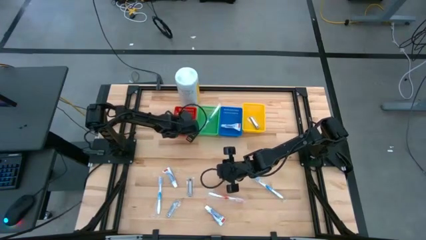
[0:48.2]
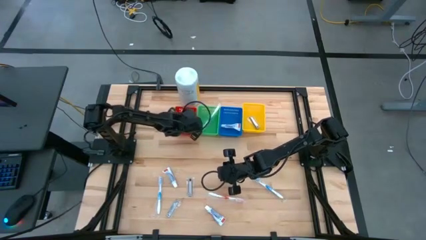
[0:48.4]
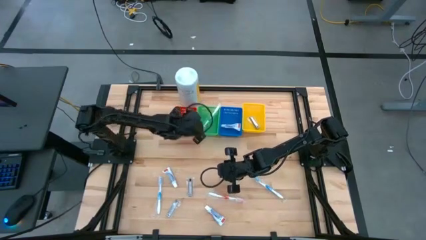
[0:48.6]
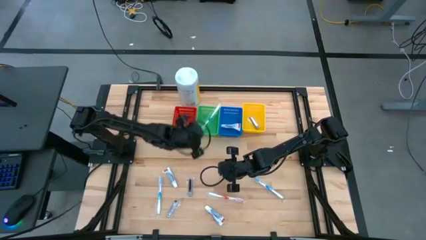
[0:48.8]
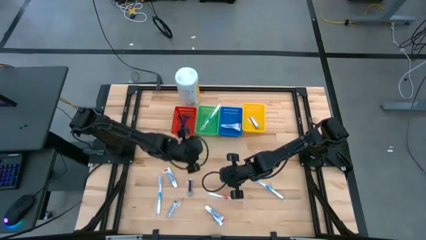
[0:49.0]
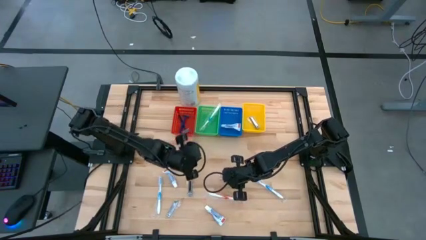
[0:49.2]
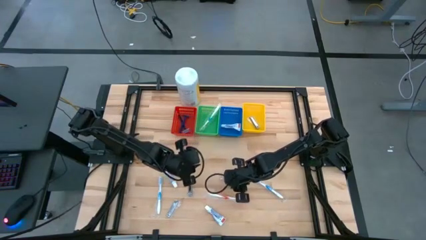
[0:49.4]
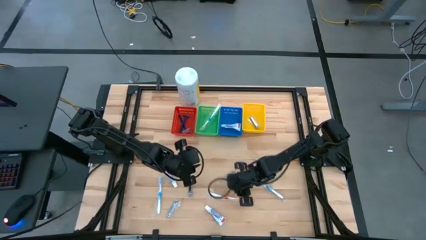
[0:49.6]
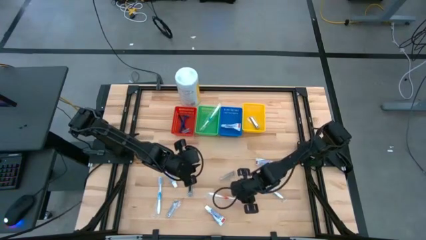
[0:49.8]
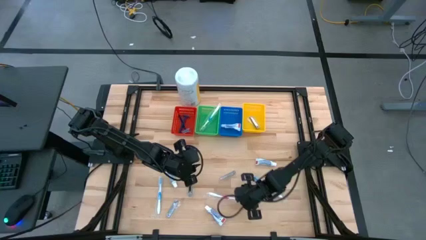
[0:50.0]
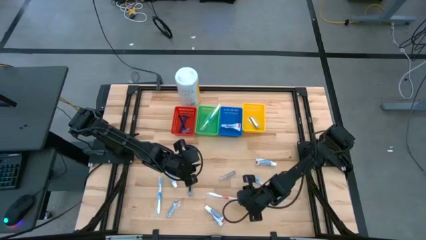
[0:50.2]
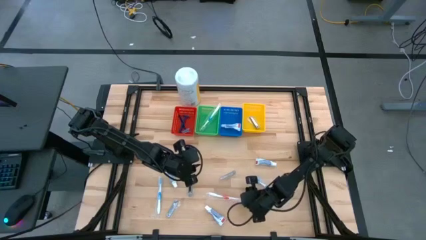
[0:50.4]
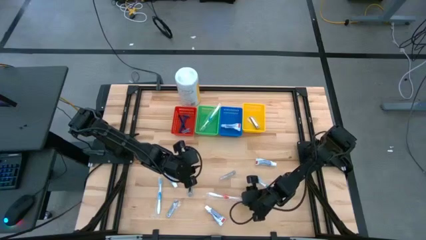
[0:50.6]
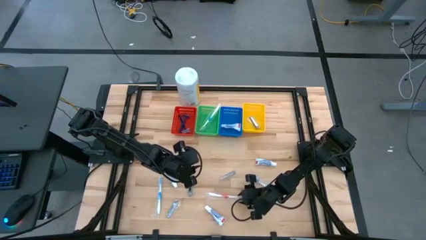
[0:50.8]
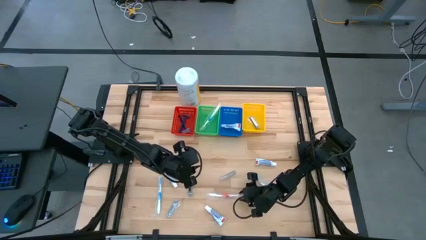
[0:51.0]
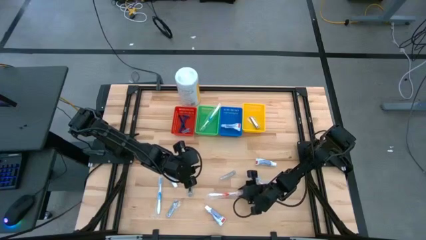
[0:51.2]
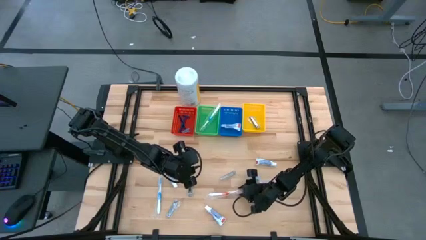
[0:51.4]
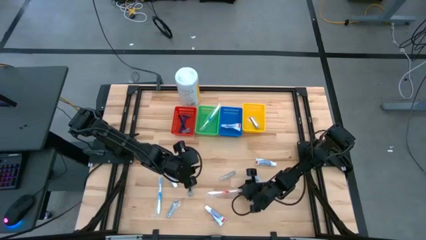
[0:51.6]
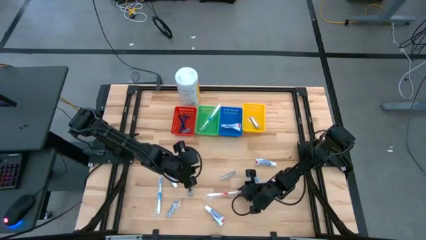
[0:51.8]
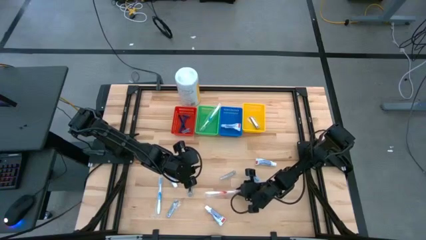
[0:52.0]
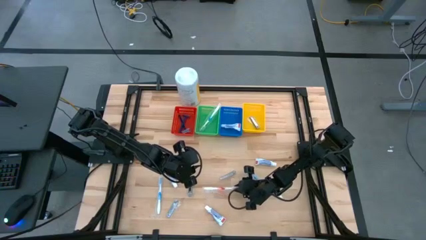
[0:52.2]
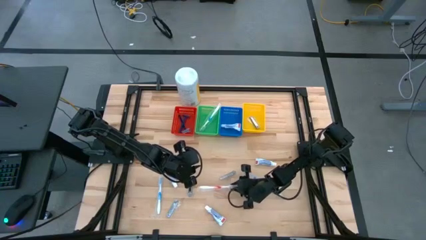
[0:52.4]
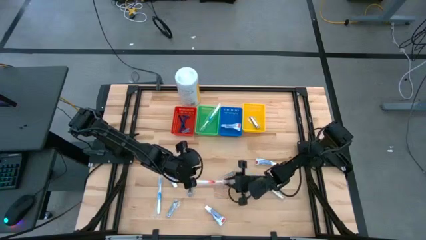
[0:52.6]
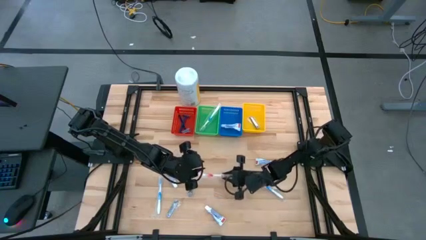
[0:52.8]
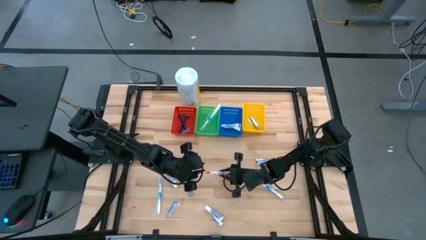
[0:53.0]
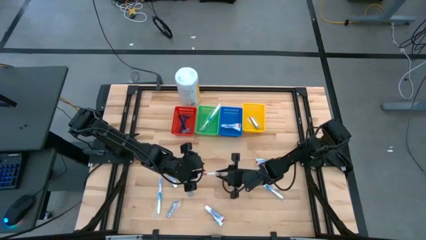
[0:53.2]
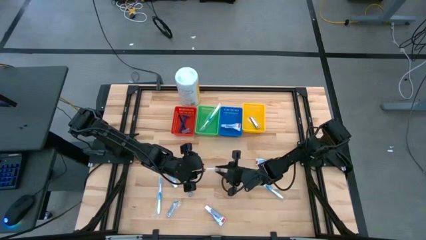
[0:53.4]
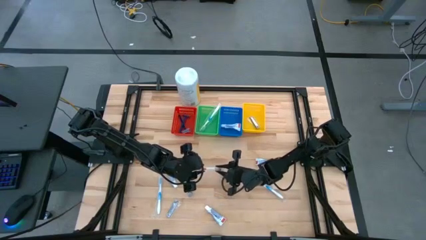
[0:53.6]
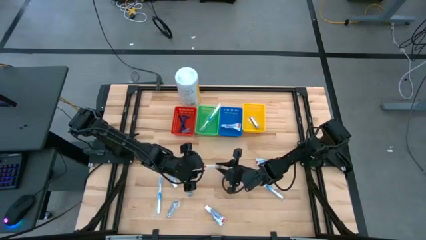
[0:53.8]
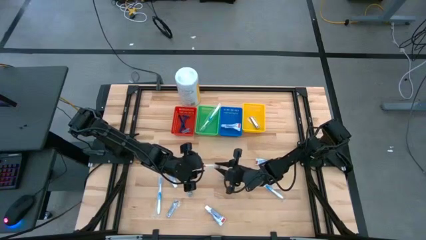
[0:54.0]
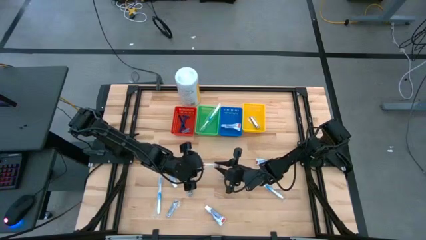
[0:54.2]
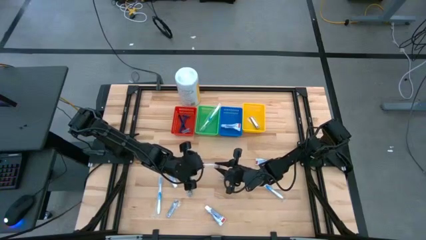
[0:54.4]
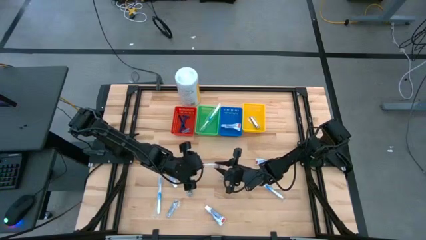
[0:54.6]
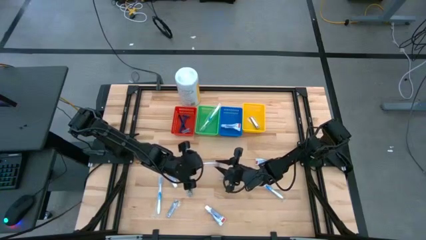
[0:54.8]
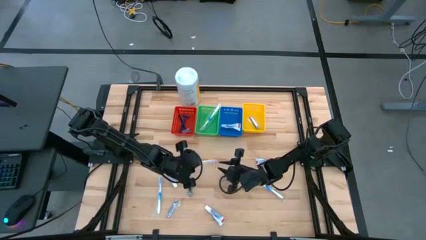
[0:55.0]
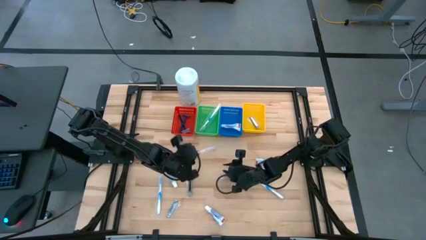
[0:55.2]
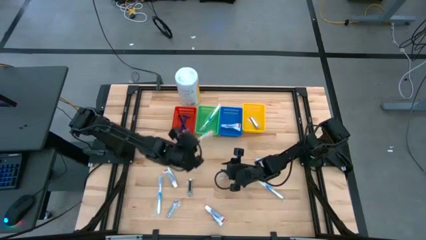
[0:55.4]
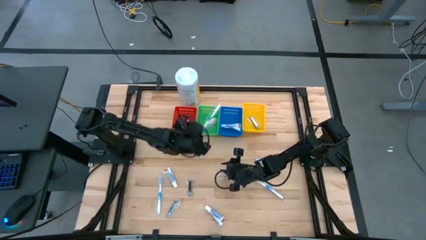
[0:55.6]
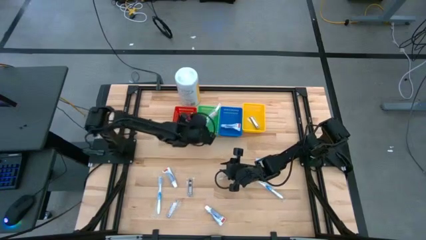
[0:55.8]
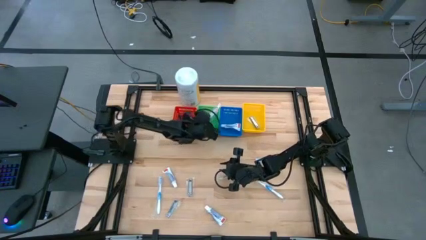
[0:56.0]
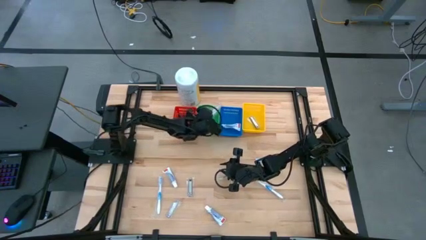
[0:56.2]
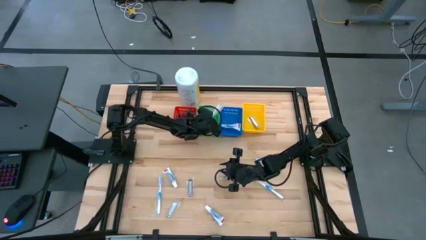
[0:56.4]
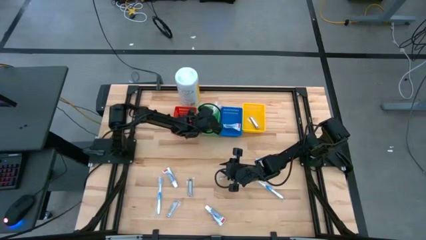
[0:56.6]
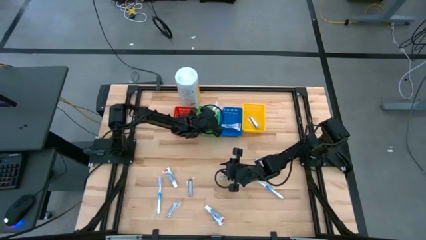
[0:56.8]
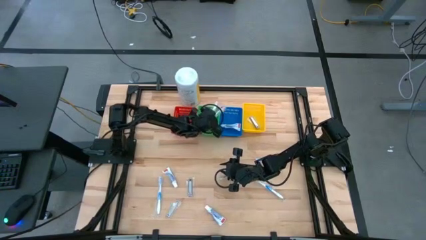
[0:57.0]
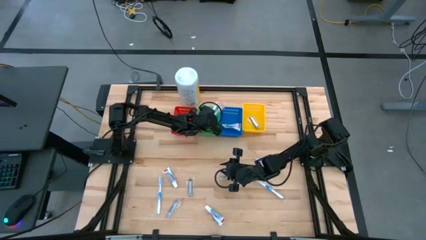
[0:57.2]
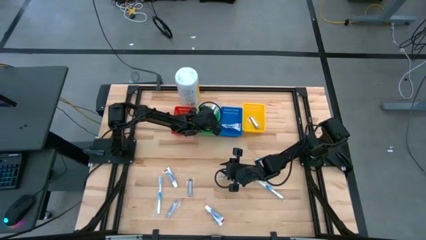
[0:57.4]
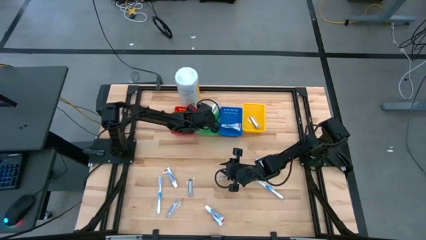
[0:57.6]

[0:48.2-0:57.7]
Task: Pick & Place Travel size toiletries
Put the orange toothbrush into the green bin

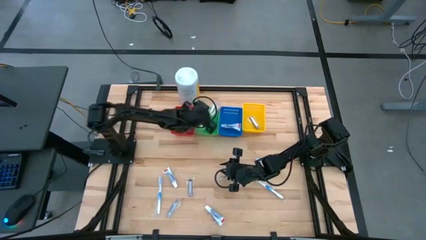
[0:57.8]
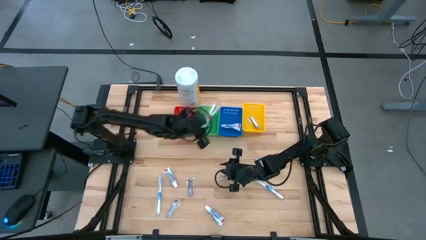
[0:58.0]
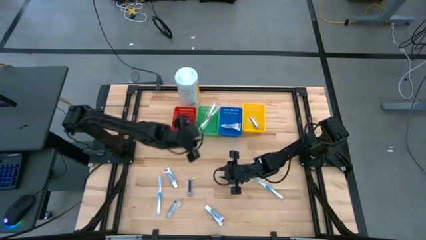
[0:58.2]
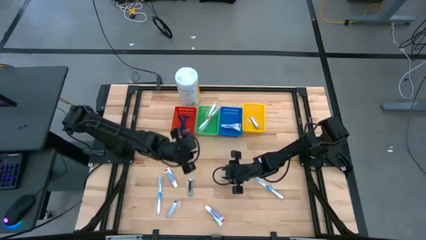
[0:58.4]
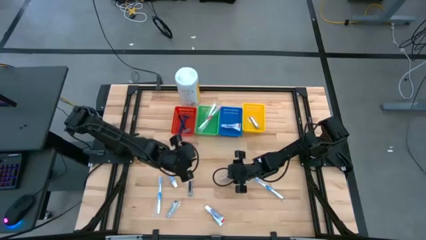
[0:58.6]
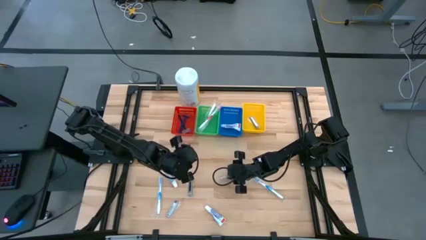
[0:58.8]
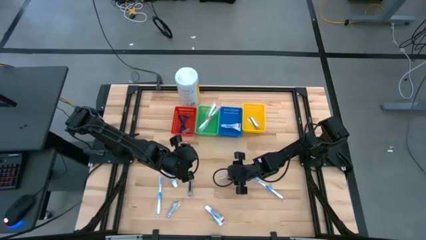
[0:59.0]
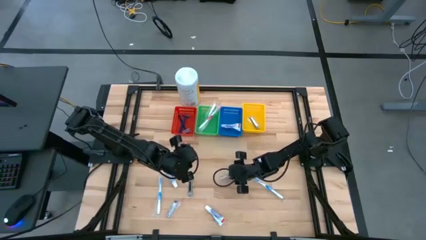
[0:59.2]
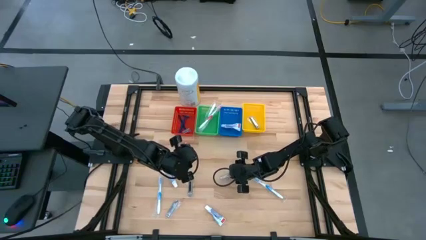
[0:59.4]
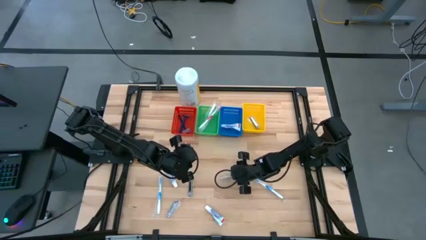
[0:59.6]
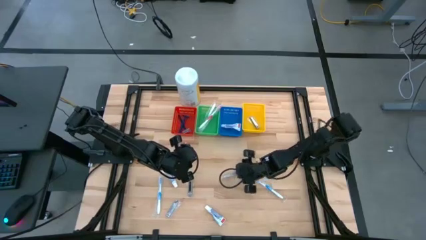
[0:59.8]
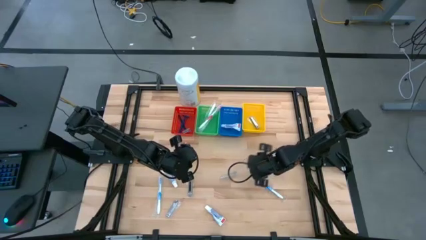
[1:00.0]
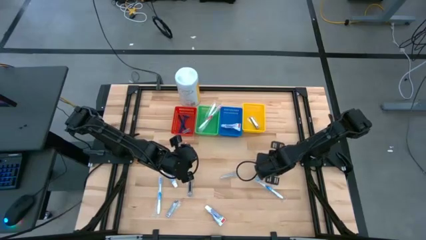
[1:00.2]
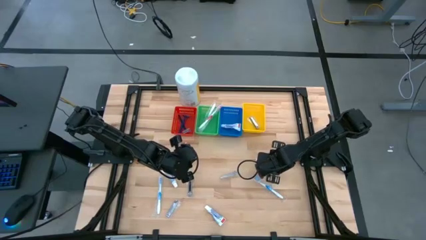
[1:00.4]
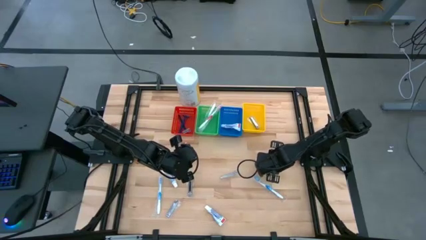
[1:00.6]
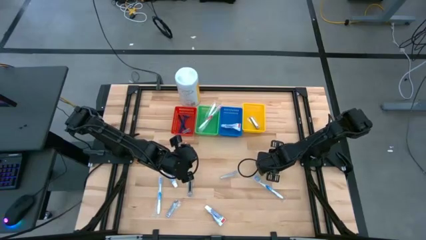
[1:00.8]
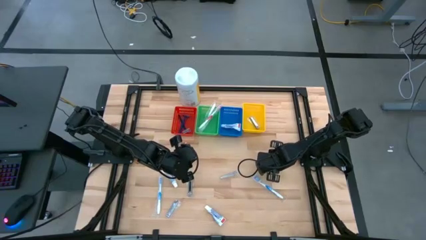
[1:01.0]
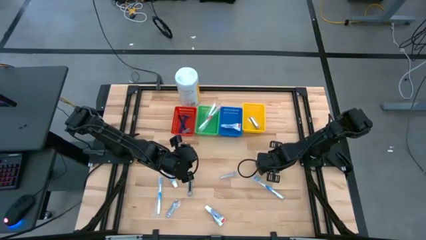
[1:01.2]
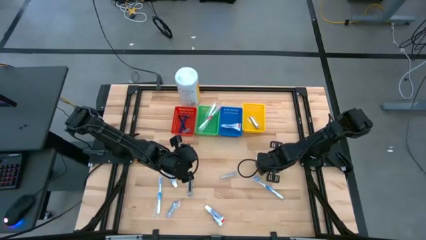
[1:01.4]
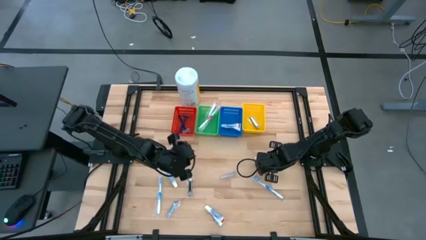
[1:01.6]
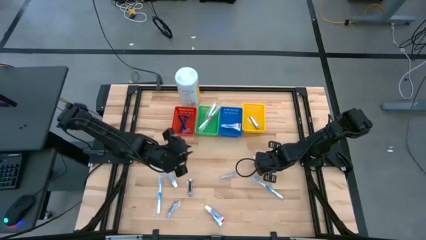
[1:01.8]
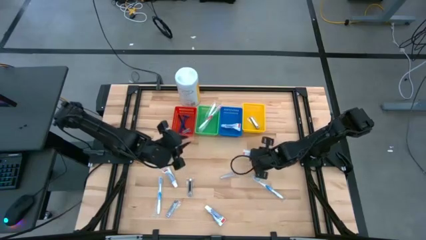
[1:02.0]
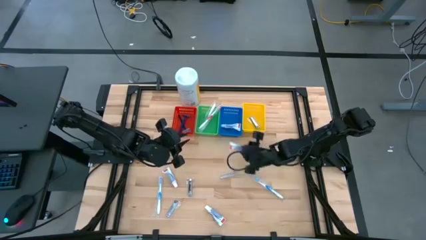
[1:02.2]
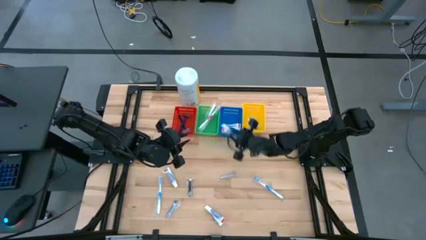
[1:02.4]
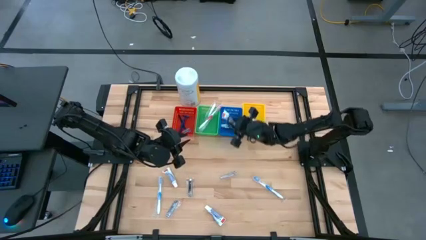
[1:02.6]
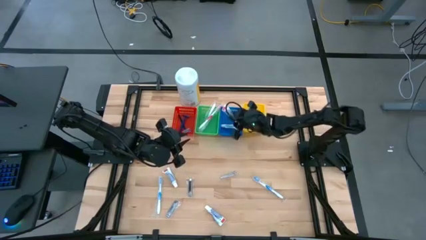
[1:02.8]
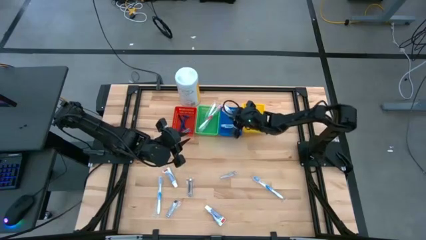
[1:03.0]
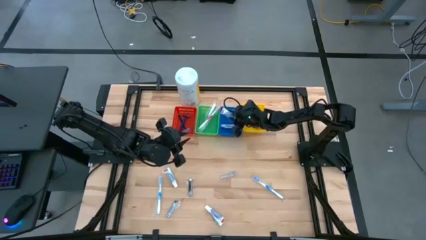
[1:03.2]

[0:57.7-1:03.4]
Put the white toothpaste into the blue bin
